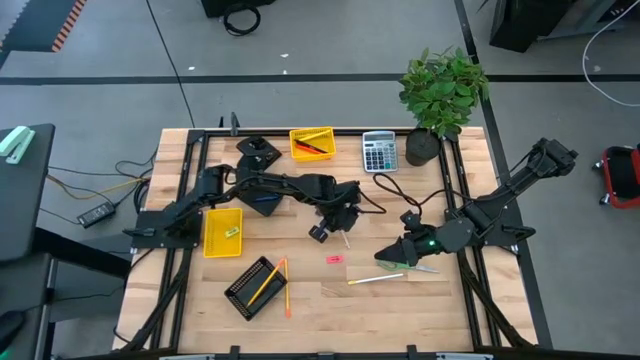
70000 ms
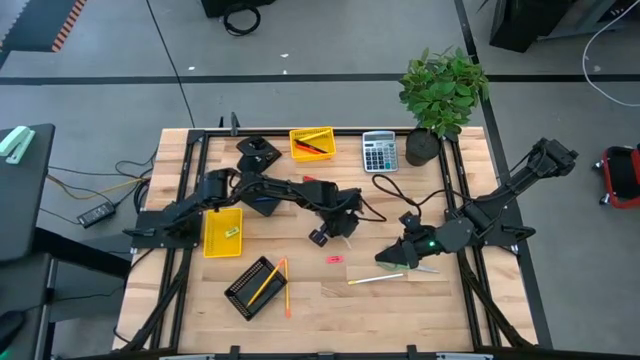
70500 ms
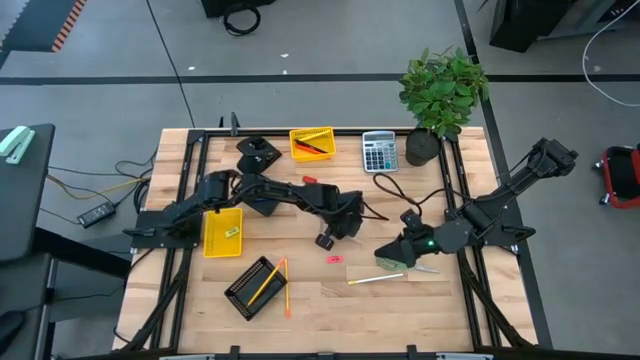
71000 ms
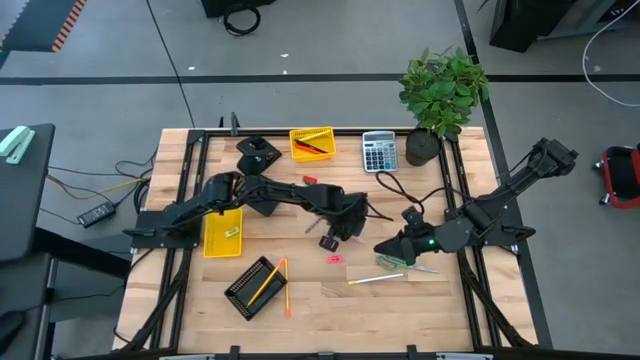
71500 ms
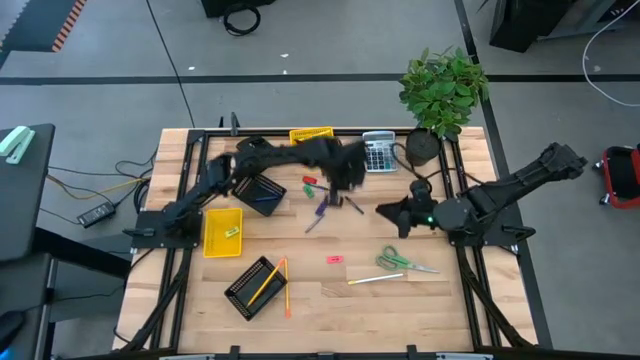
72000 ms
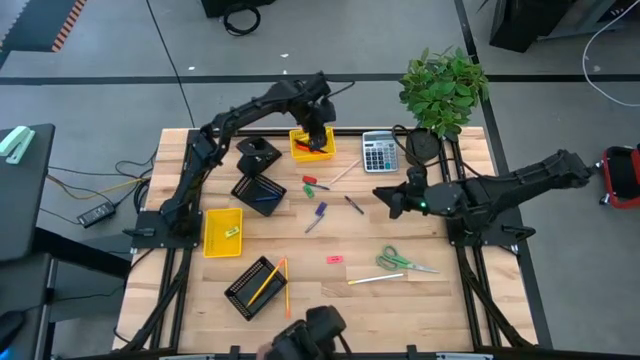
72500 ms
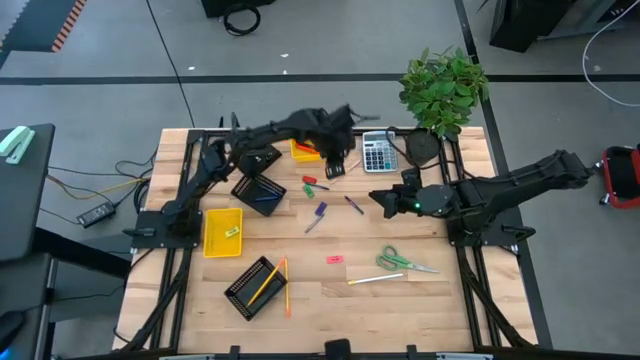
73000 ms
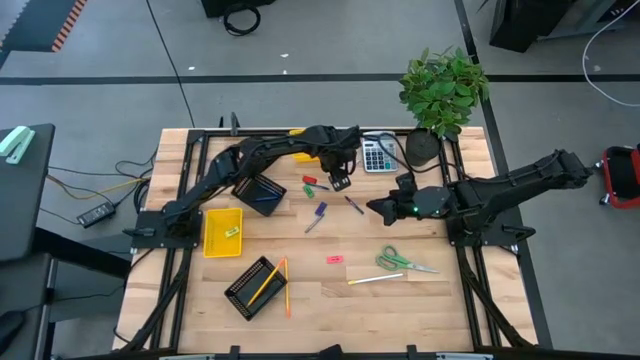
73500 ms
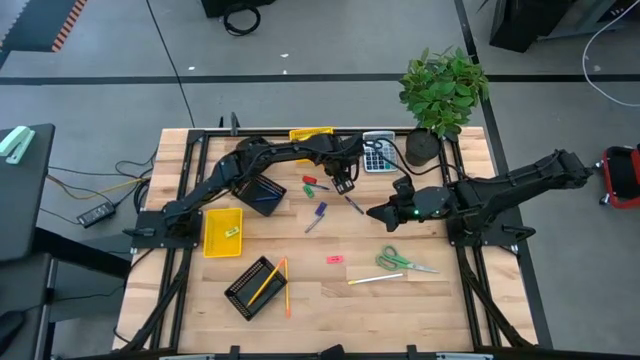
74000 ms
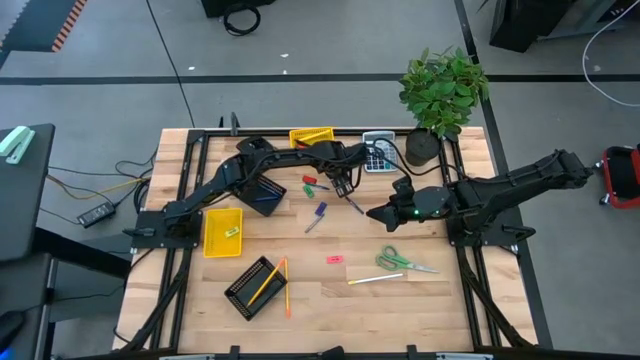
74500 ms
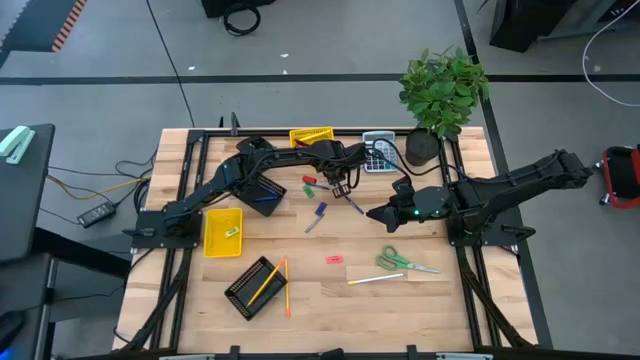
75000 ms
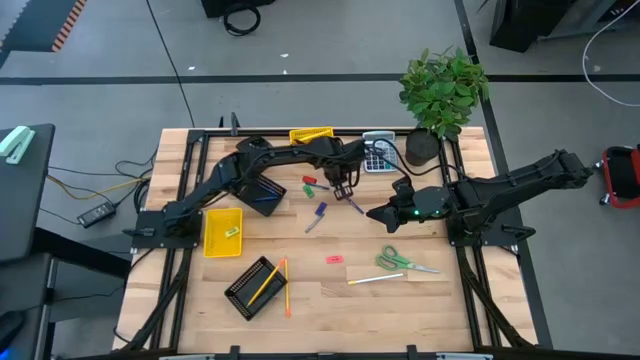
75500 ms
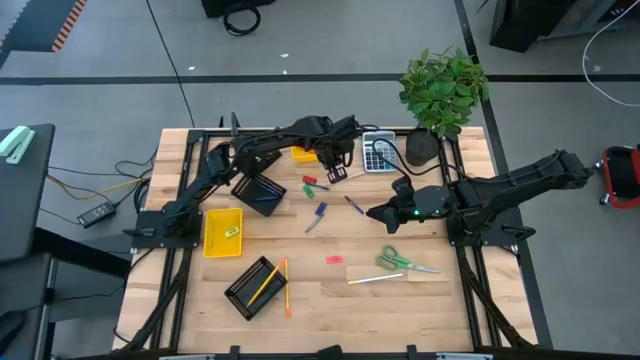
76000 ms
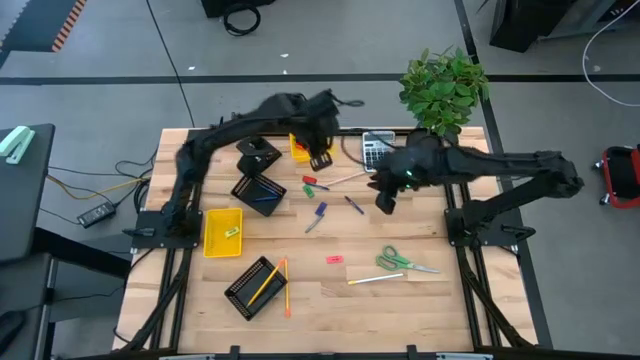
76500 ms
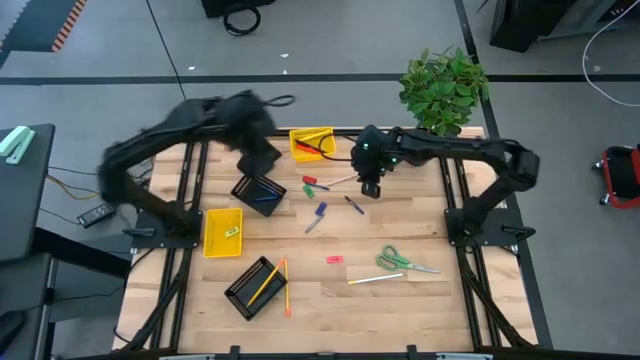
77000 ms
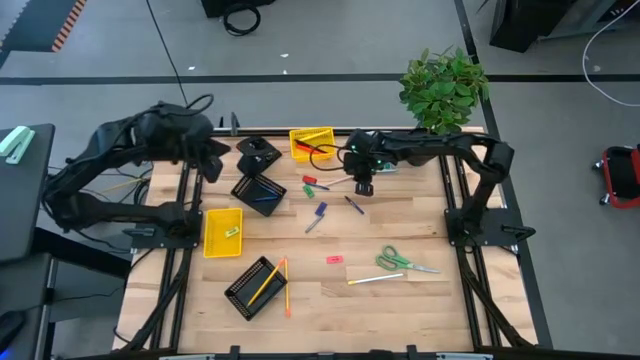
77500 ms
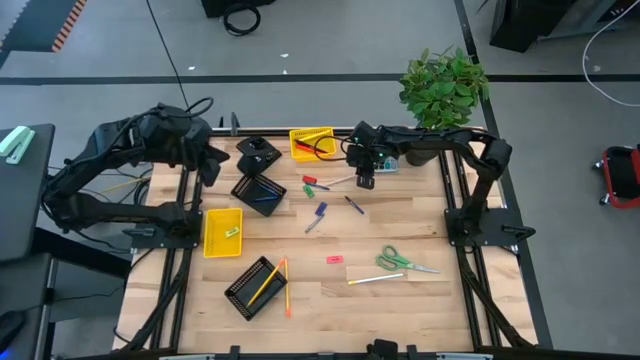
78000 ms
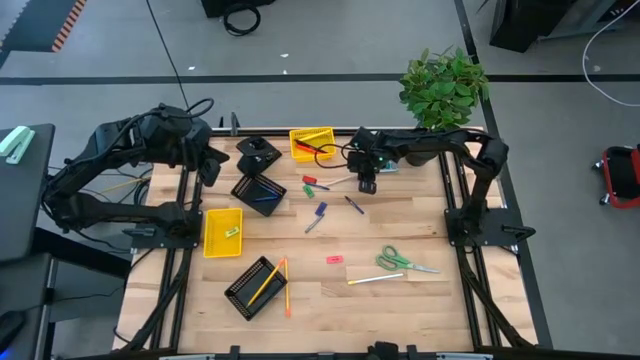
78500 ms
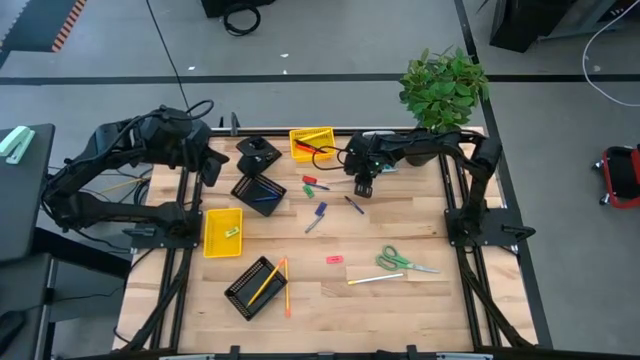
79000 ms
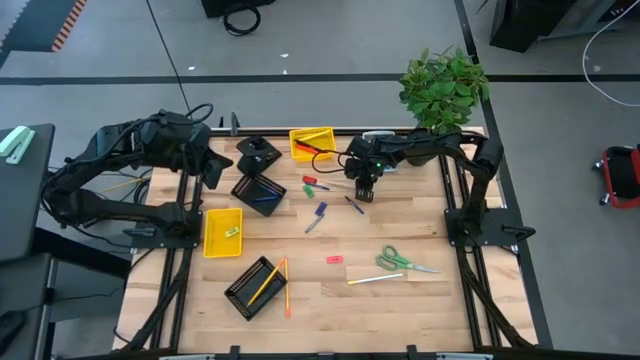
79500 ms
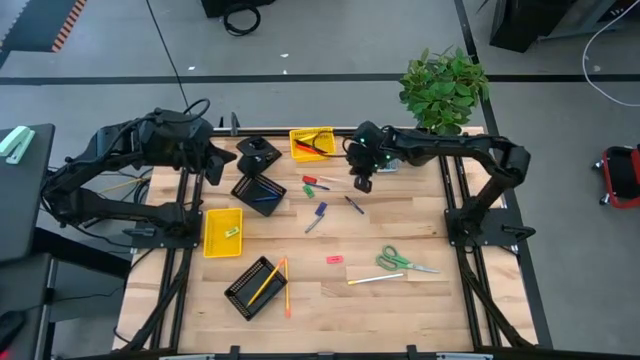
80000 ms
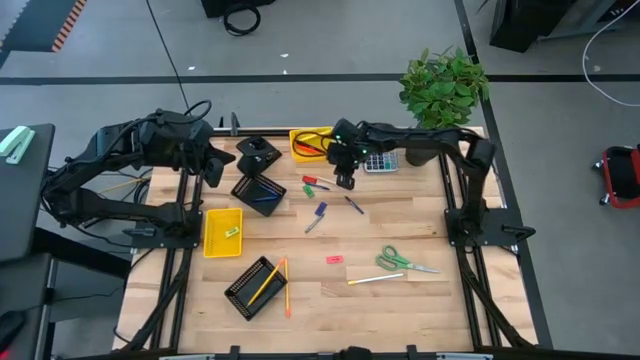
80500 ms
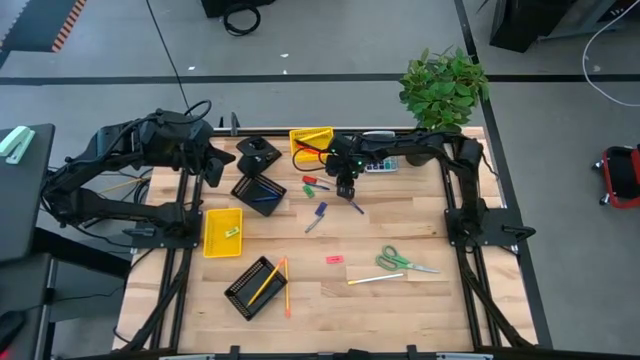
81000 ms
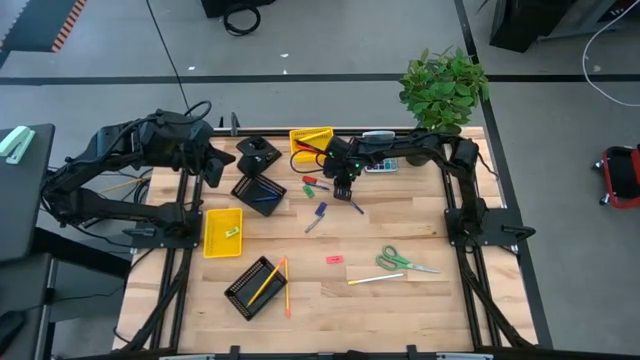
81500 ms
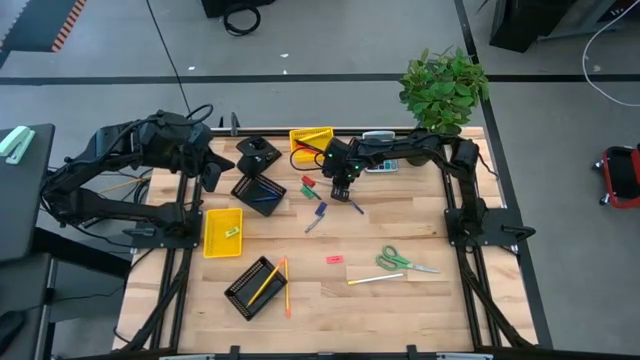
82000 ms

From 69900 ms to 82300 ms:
Task: Sort crayons/erasers/pens/pencils in bins
Put the light pink pen into the top yellow basket

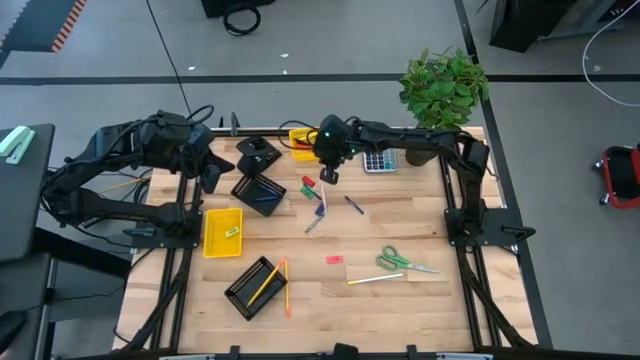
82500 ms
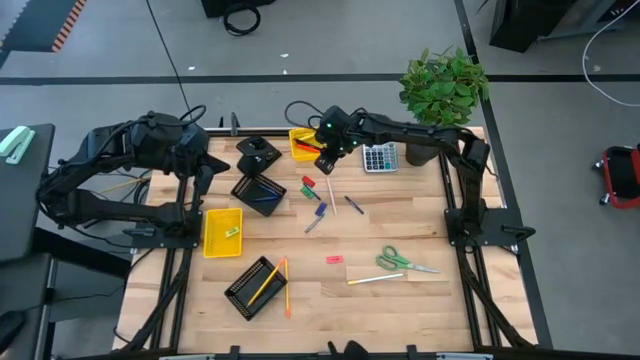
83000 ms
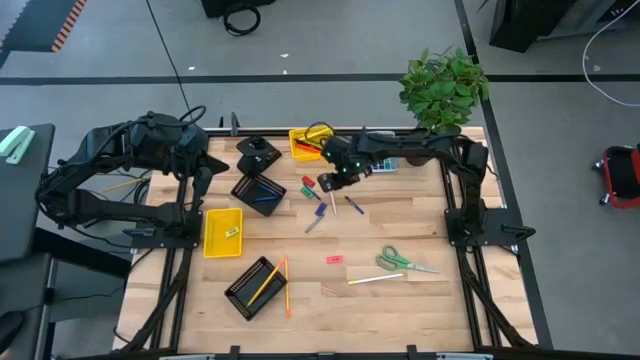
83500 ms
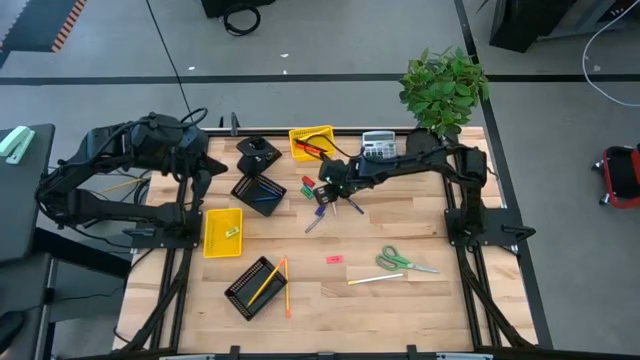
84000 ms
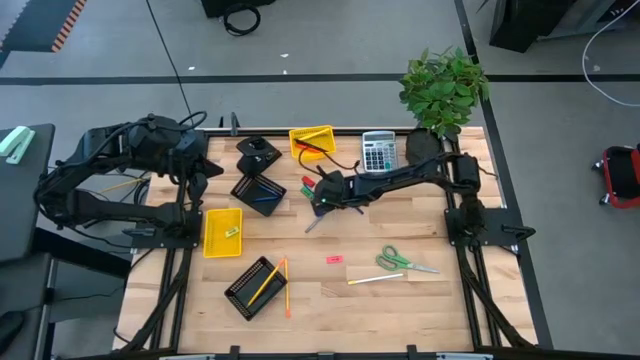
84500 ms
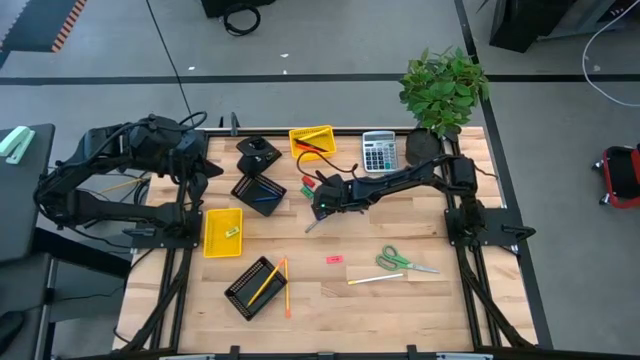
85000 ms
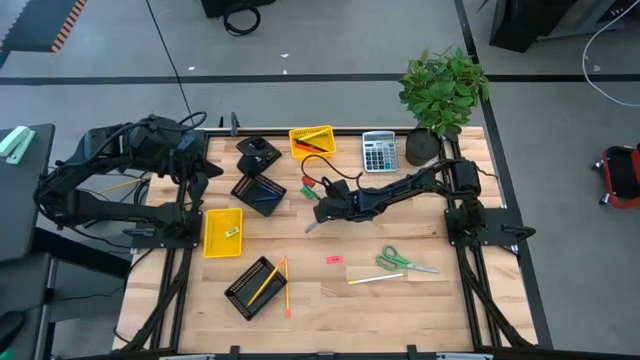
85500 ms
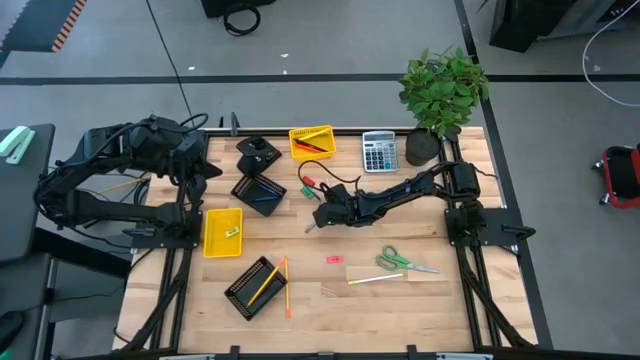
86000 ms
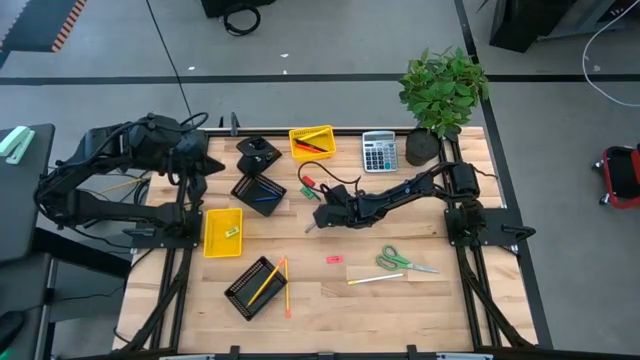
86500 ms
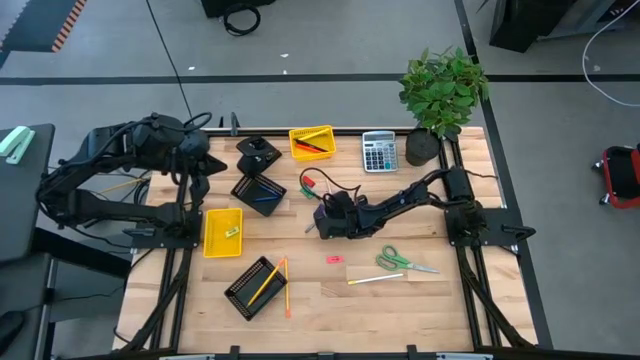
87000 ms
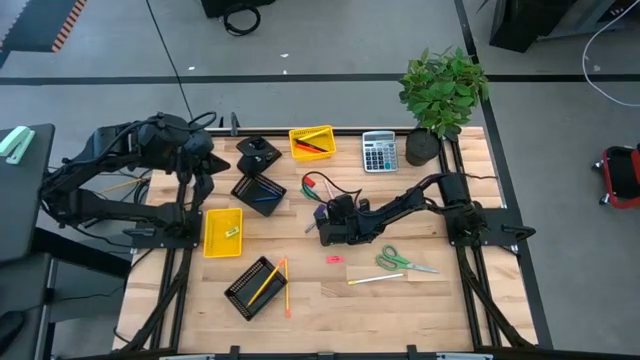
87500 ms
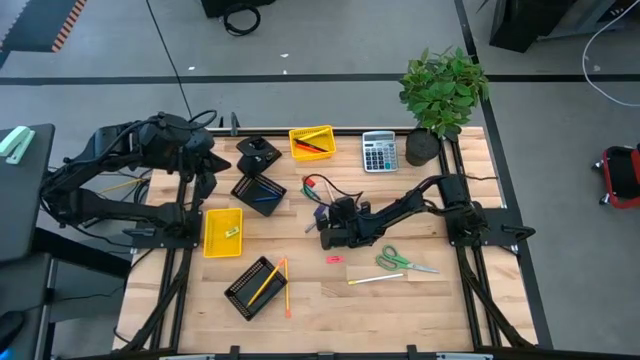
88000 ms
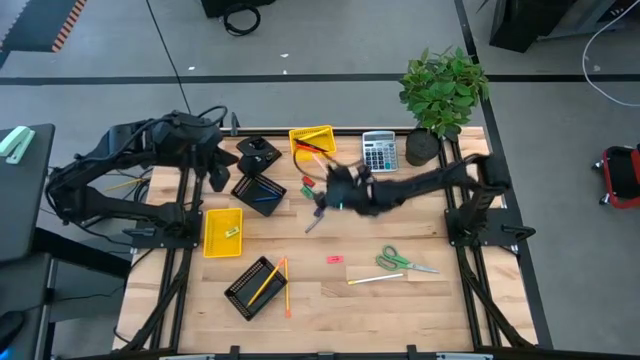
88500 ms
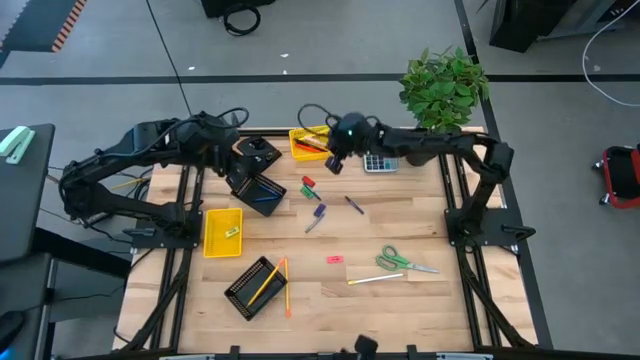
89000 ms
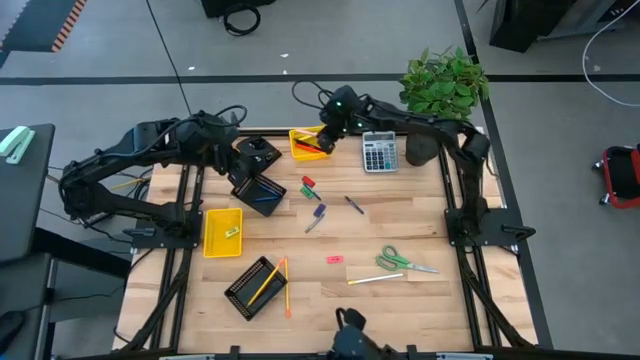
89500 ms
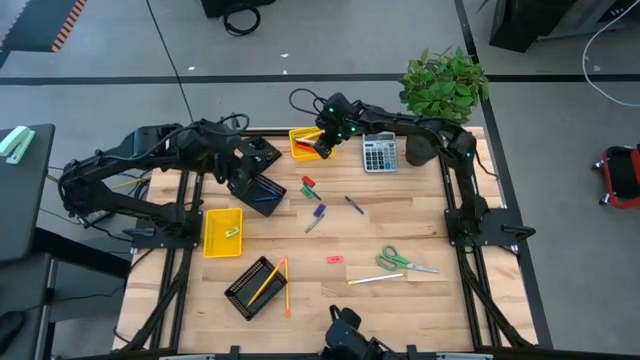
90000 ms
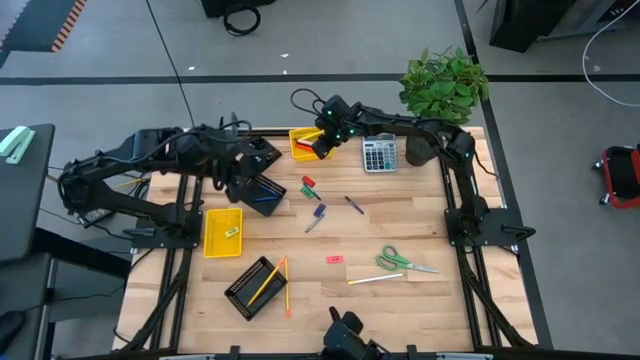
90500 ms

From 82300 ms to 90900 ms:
Put the light pink pen into the top yellow basket
